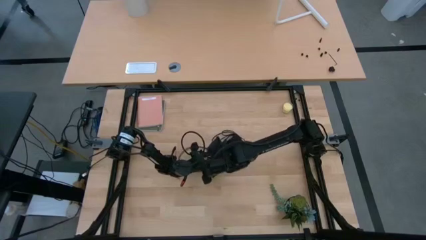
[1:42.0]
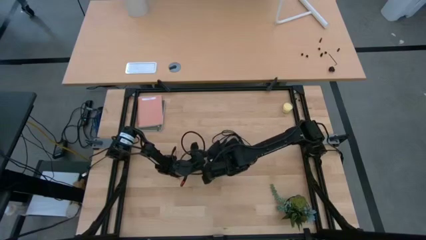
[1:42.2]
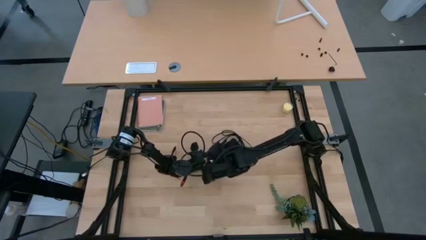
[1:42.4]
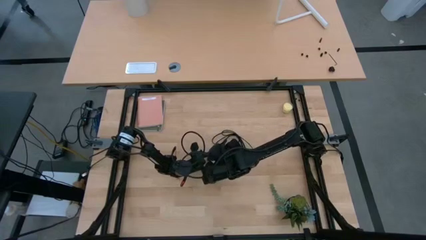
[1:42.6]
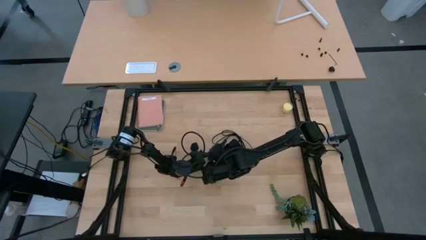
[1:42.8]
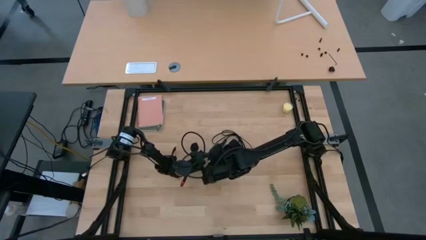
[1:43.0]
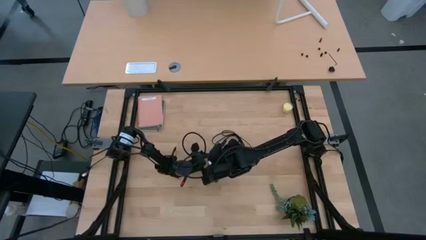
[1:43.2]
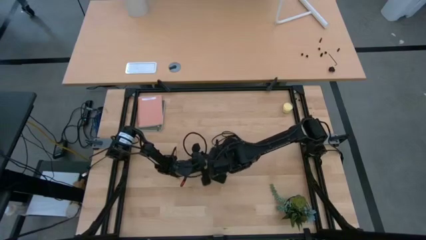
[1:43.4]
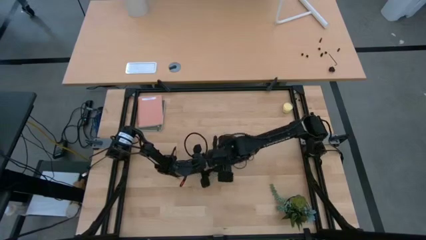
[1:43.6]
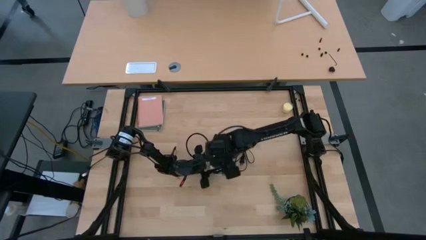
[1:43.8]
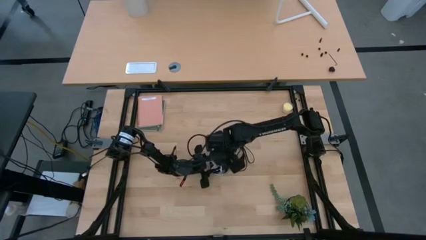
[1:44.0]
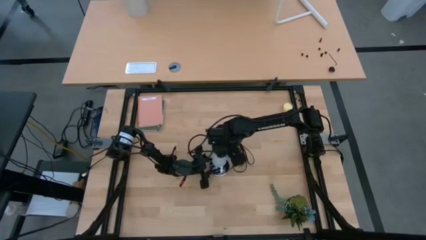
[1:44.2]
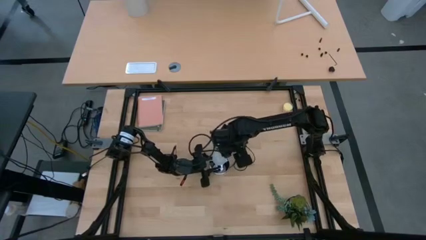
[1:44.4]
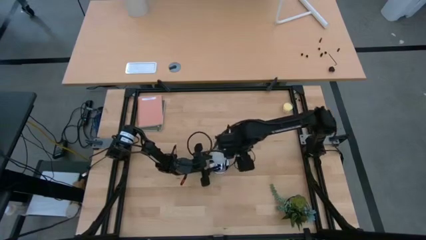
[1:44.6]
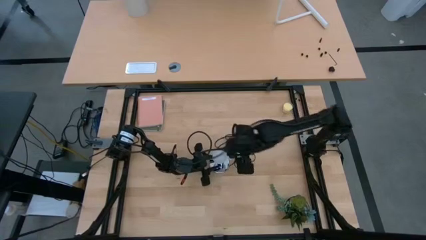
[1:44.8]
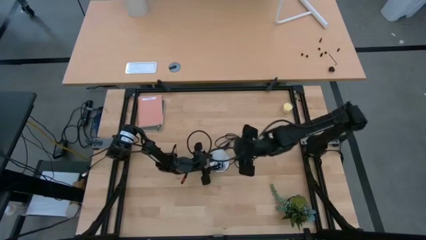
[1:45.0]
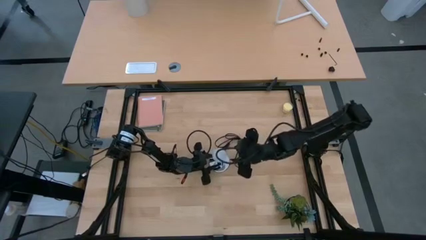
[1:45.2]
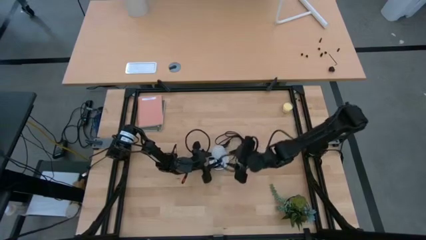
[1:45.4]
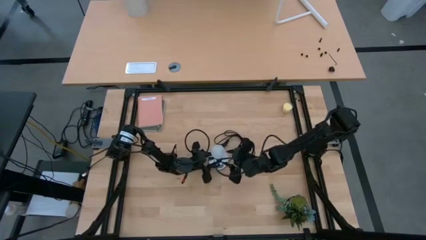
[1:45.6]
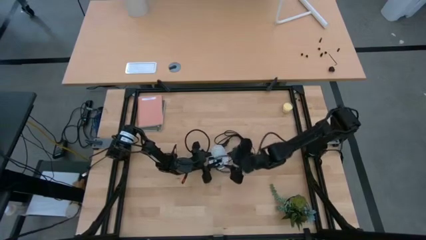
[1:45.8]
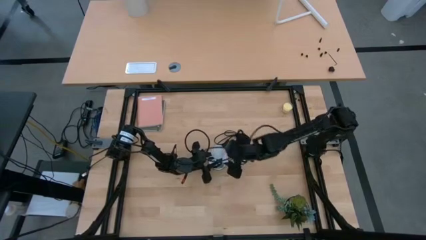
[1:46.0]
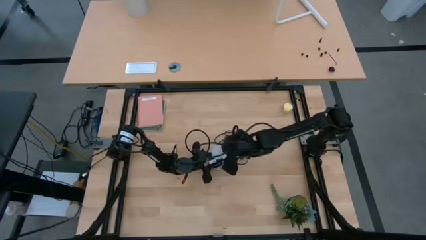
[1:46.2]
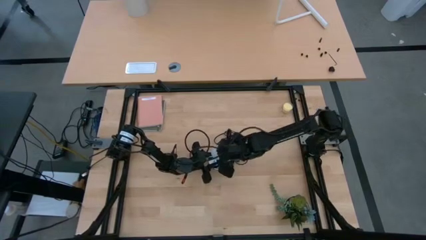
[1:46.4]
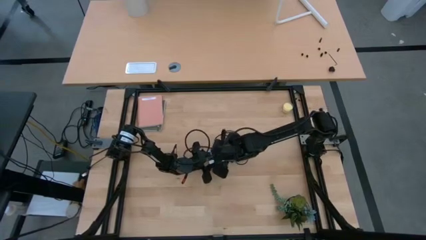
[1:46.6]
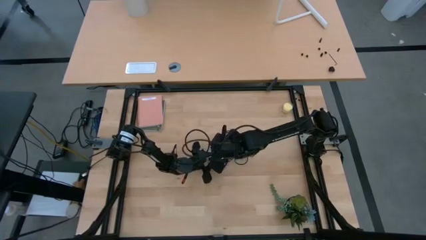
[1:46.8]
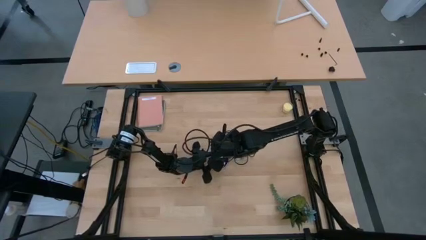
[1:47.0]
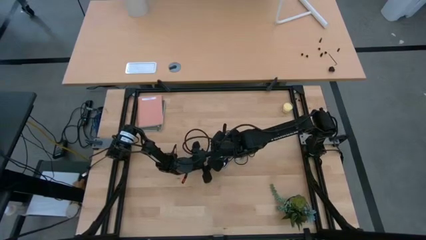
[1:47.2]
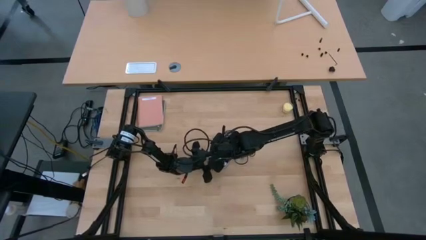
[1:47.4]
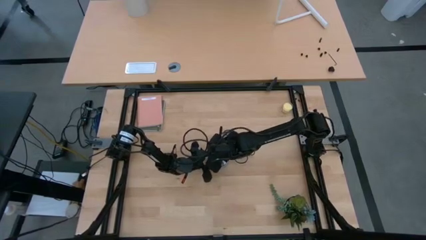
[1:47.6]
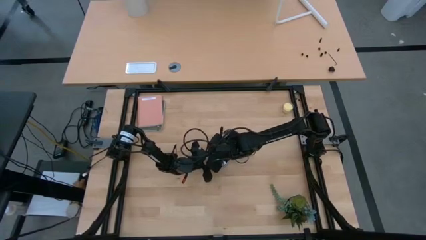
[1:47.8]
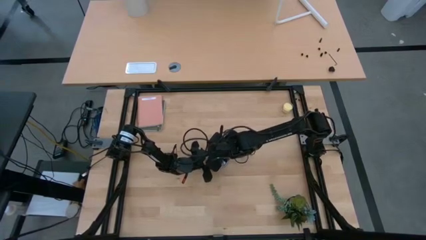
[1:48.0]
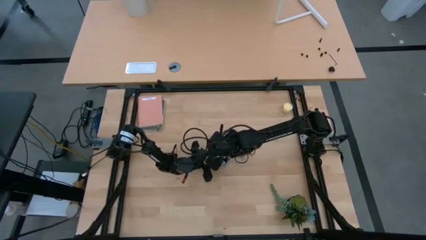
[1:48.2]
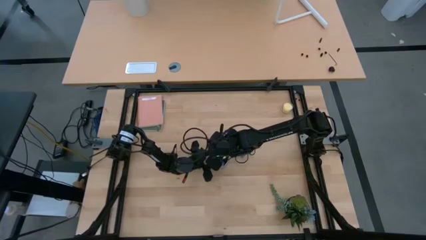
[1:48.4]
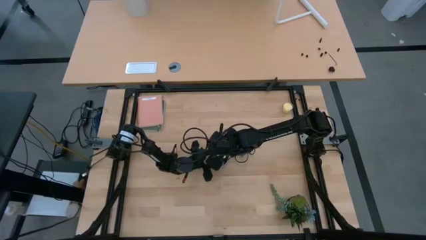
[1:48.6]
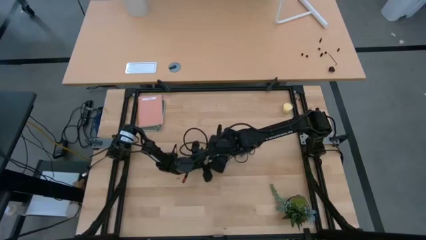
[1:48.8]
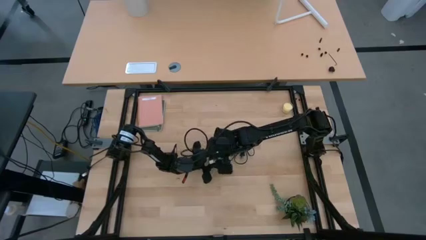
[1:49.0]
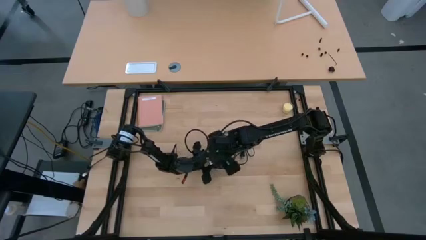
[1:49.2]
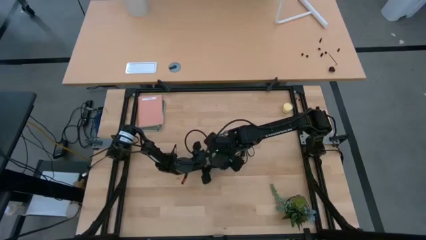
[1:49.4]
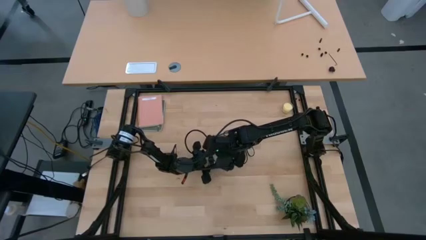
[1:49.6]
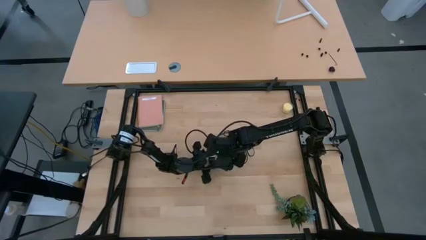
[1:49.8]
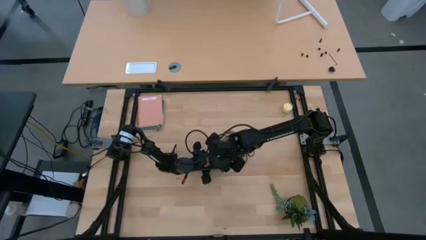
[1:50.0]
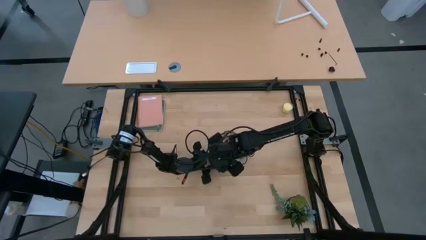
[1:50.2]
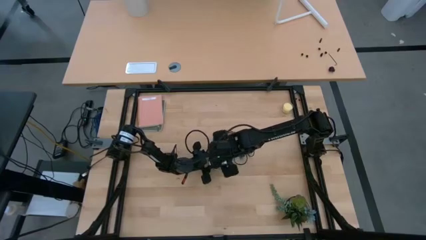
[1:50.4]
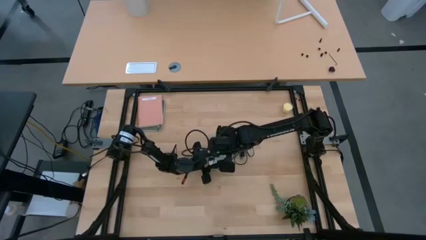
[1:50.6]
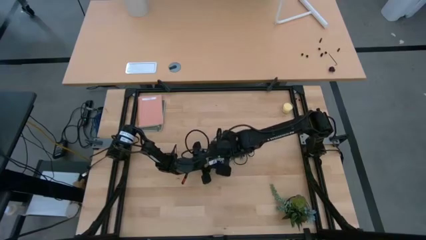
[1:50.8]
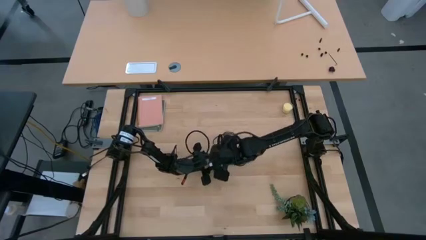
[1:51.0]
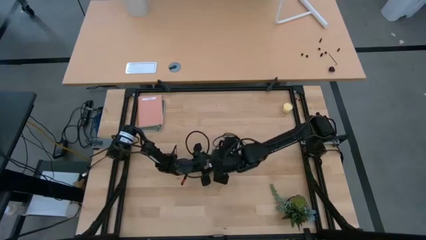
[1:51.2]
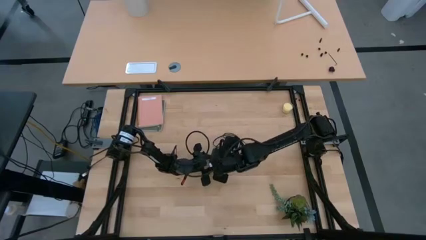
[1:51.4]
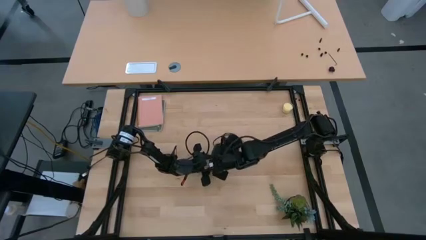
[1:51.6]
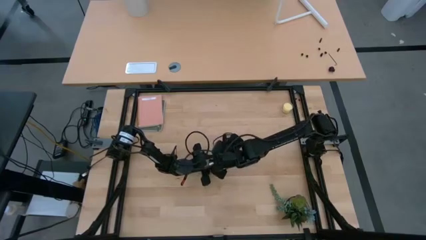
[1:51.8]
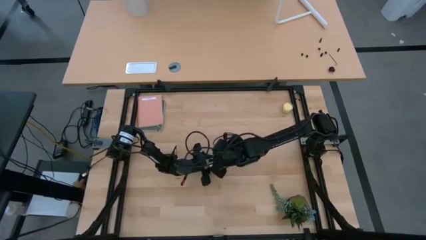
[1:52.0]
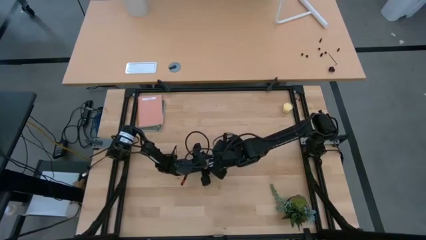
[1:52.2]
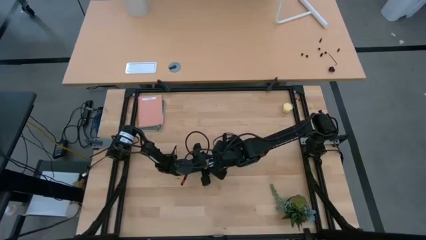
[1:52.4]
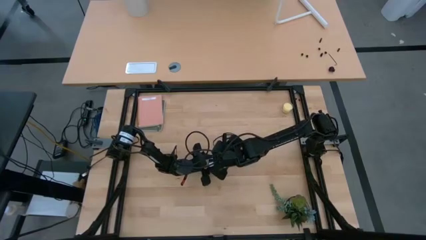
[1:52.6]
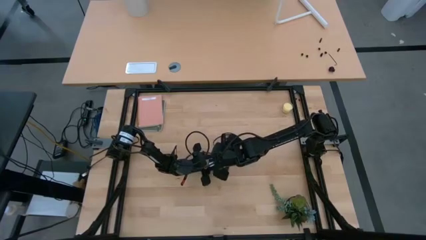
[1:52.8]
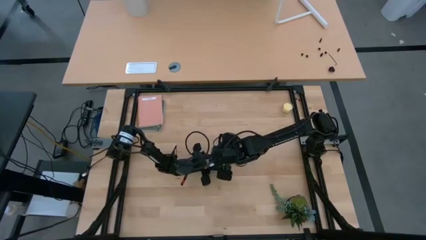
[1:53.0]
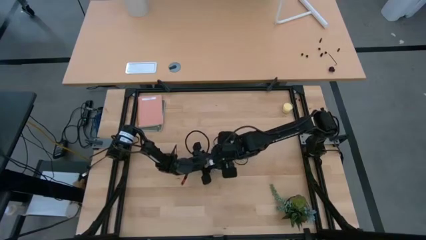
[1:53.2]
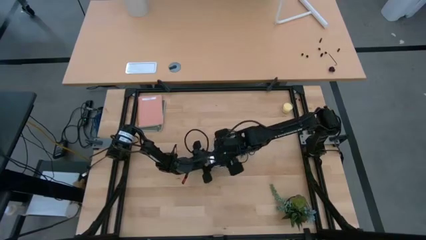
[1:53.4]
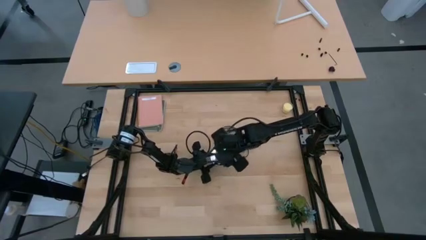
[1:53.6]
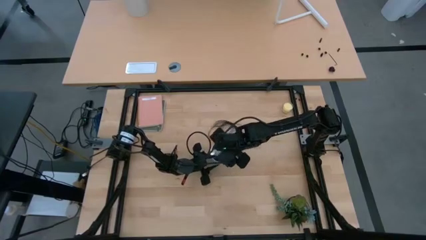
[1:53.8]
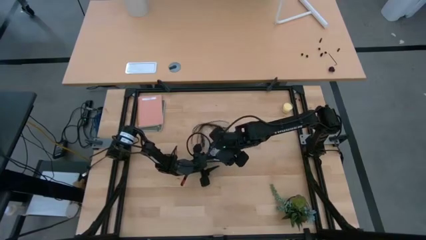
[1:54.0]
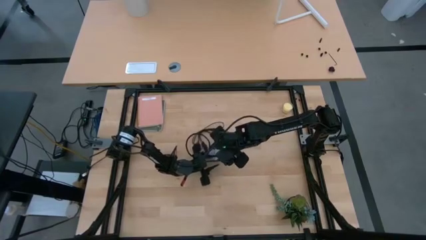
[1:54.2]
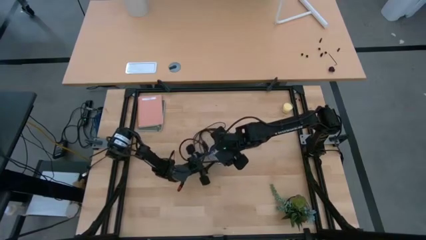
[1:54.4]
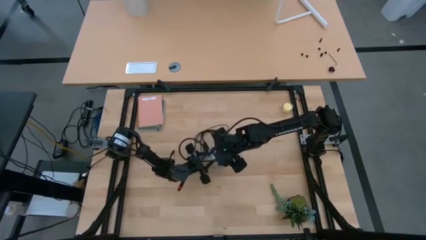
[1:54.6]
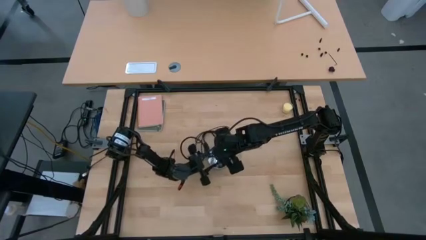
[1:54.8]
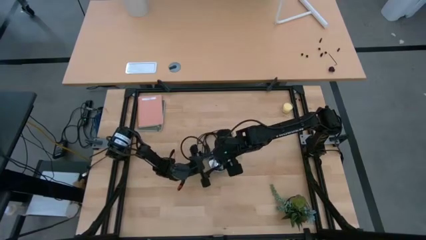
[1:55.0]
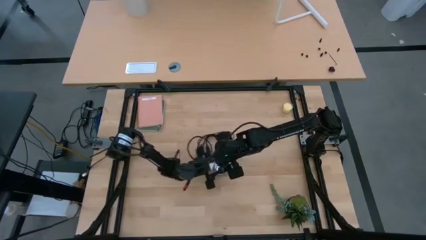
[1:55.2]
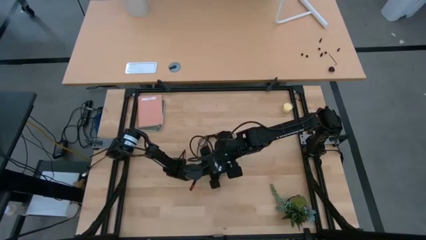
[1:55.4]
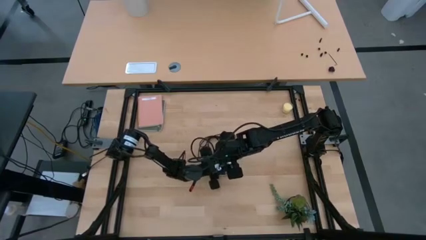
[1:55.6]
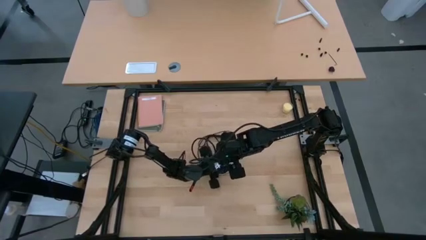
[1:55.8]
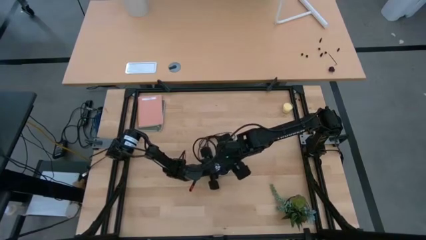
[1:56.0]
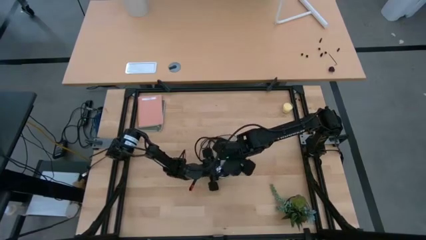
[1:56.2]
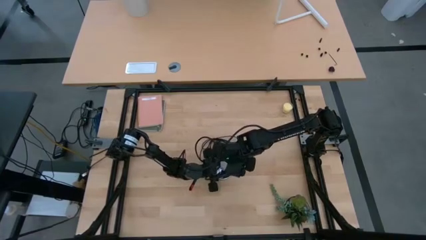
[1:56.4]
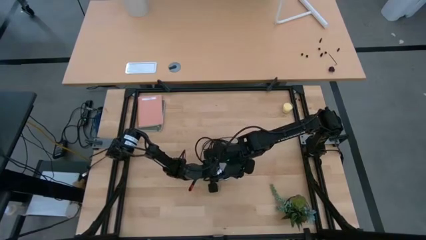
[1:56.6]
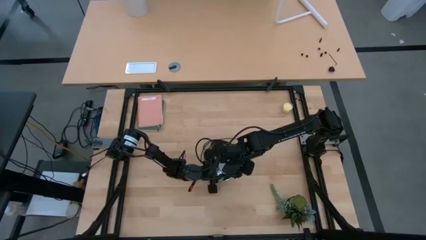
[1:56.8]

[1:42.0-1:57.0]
Task: Screw lightbulb
Remove the lightbulb from the silver lamp
